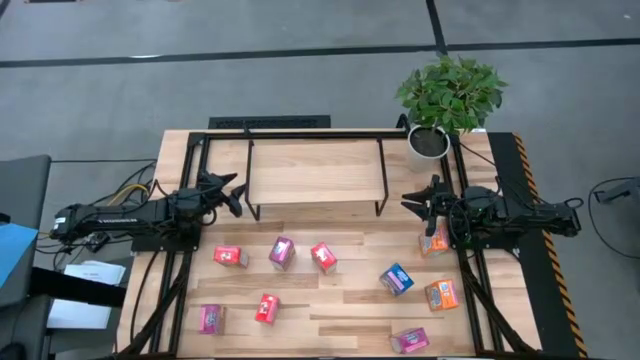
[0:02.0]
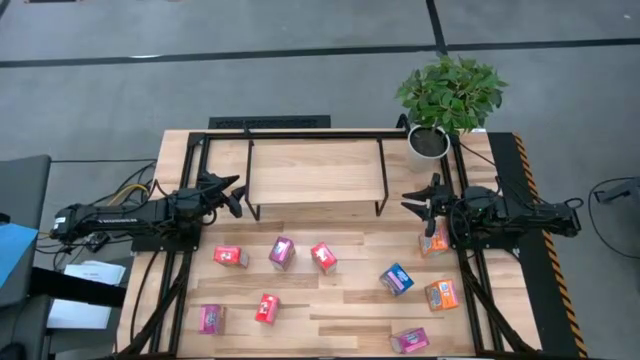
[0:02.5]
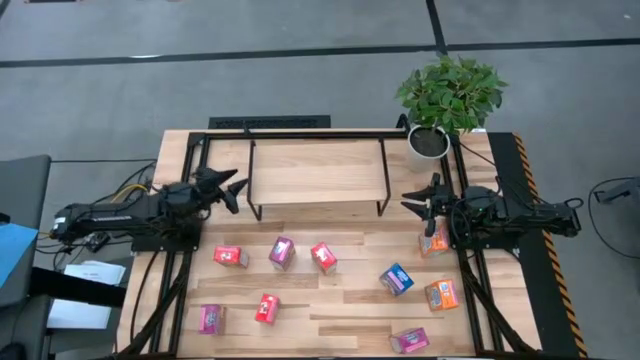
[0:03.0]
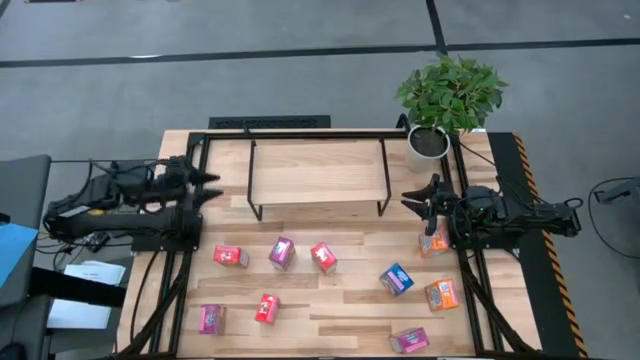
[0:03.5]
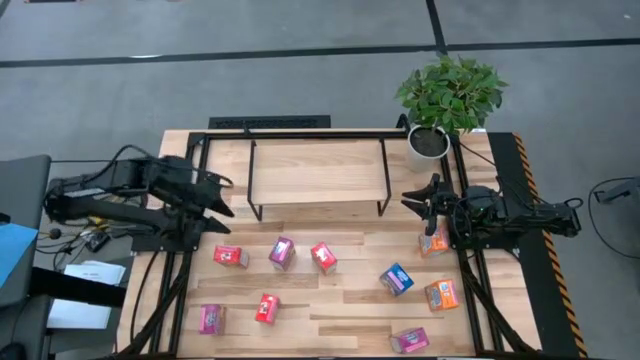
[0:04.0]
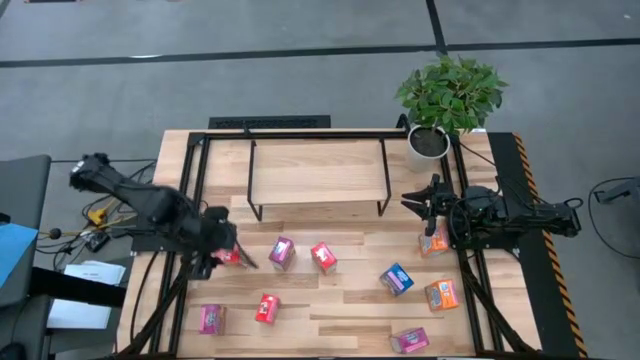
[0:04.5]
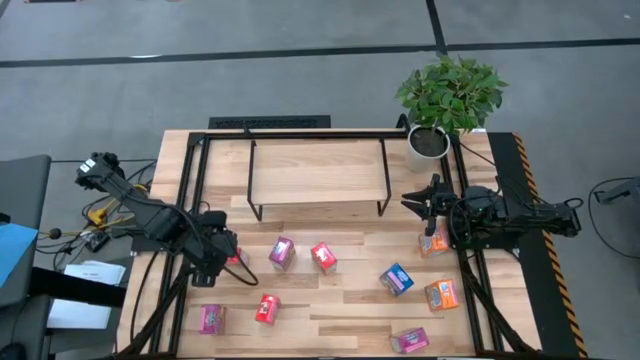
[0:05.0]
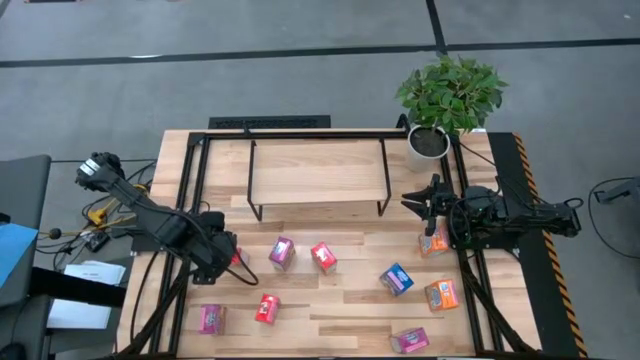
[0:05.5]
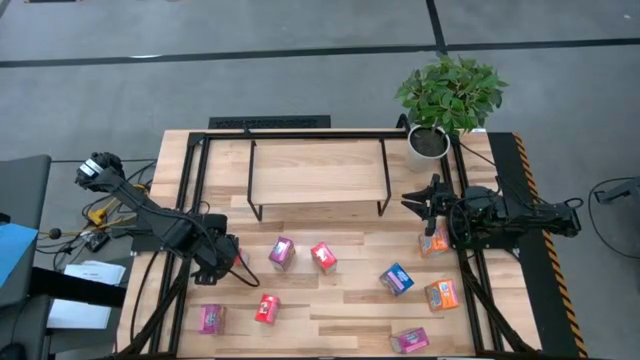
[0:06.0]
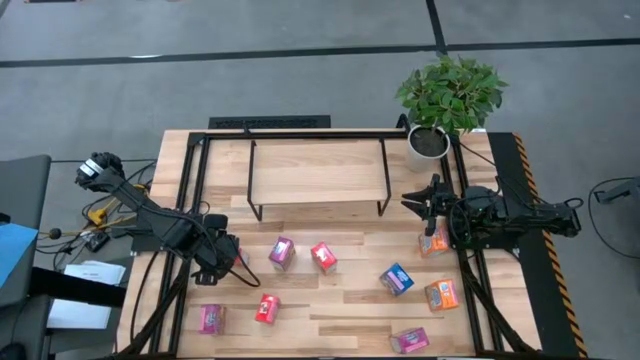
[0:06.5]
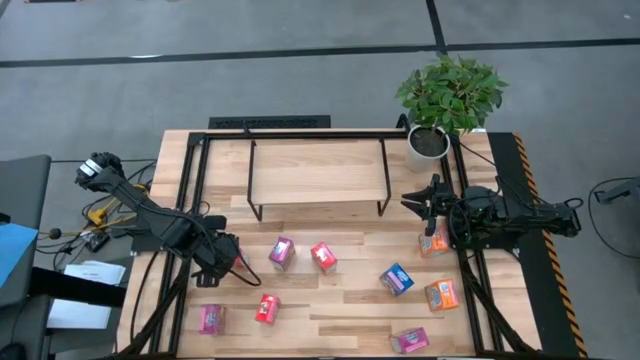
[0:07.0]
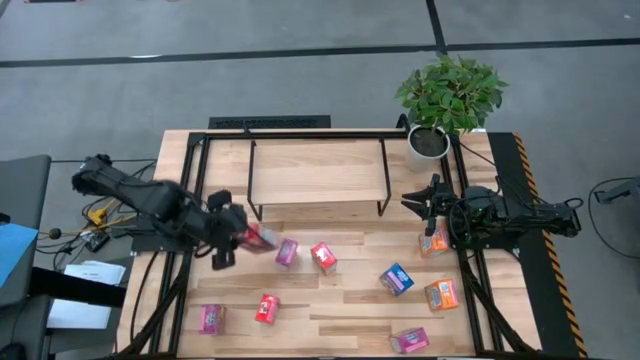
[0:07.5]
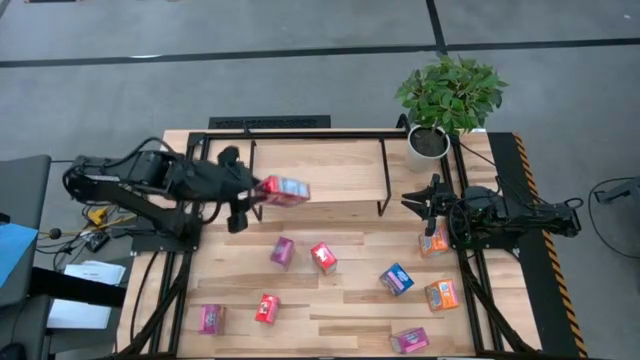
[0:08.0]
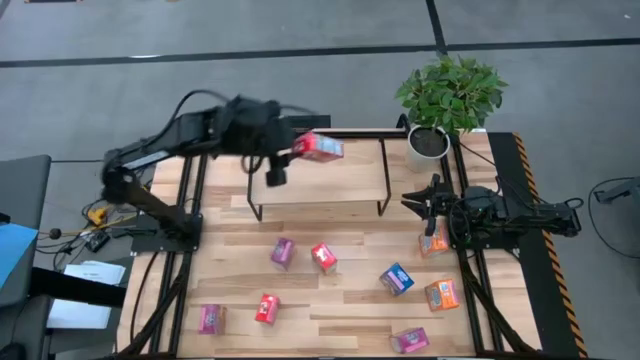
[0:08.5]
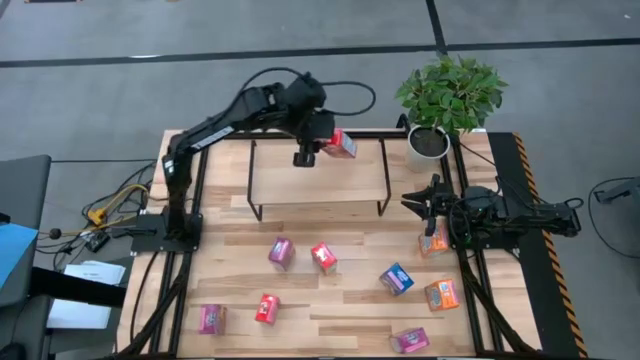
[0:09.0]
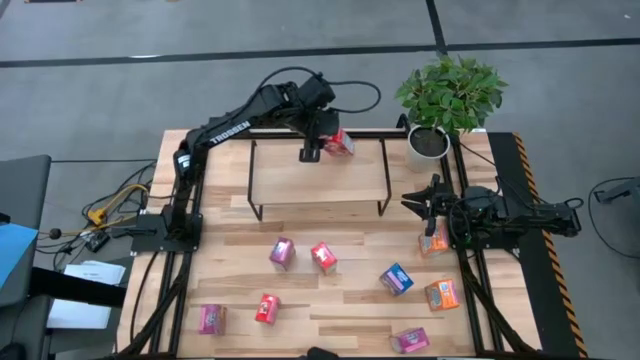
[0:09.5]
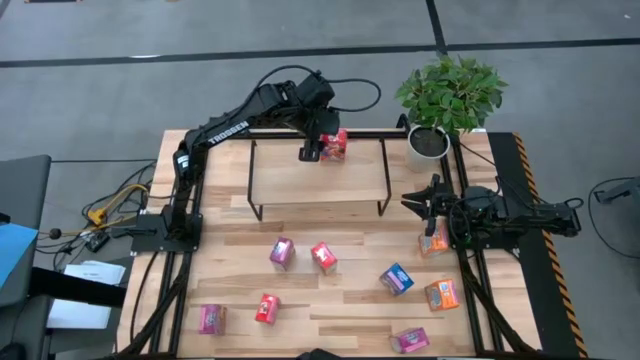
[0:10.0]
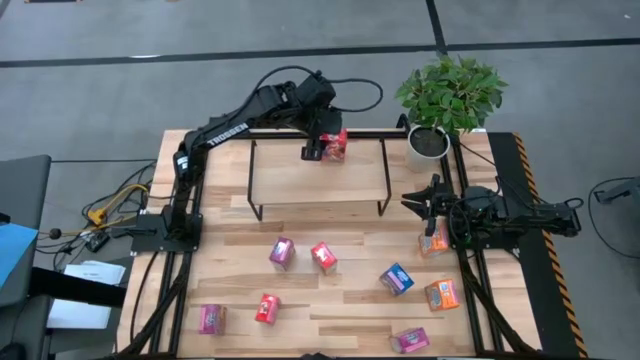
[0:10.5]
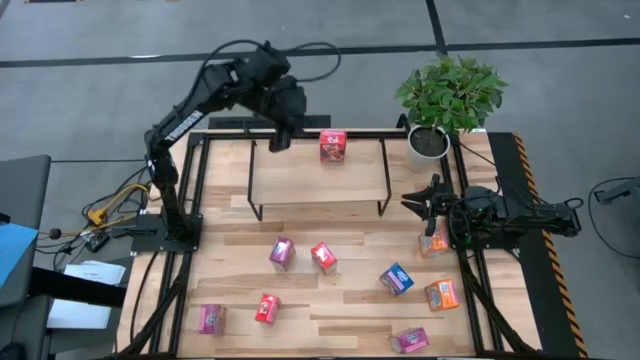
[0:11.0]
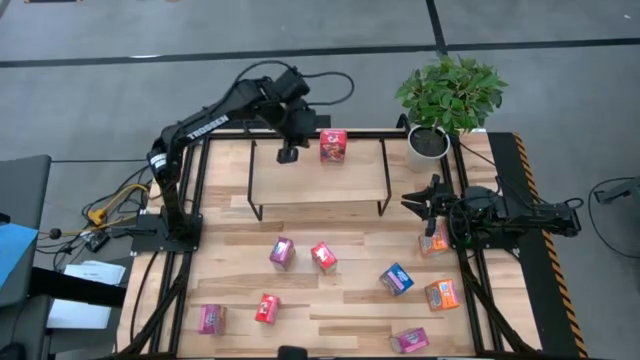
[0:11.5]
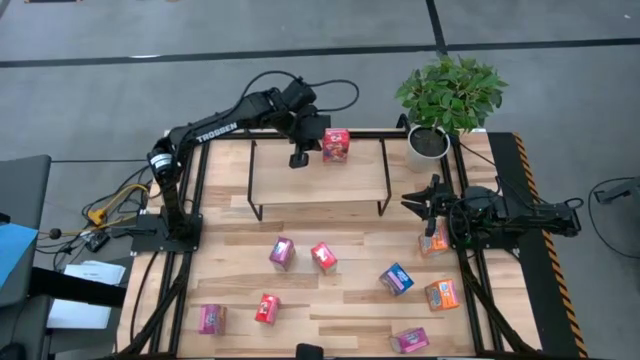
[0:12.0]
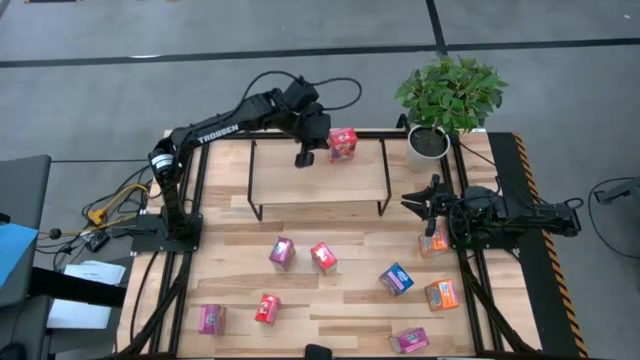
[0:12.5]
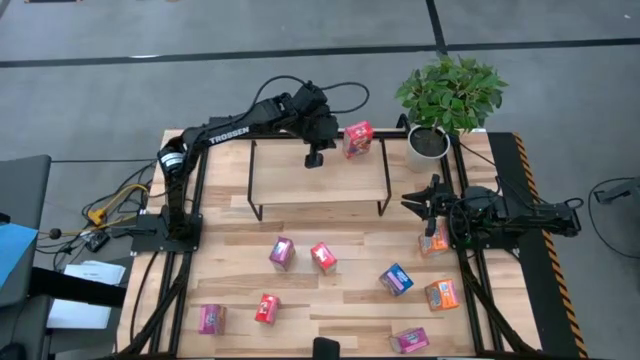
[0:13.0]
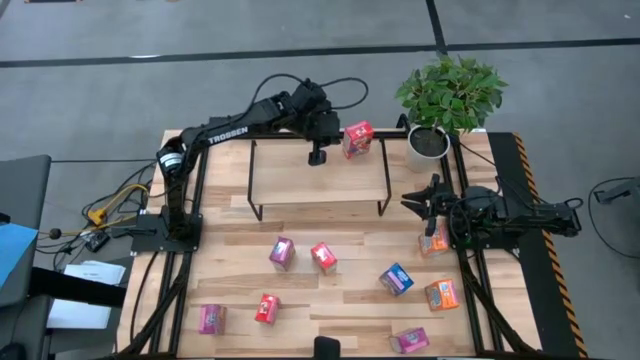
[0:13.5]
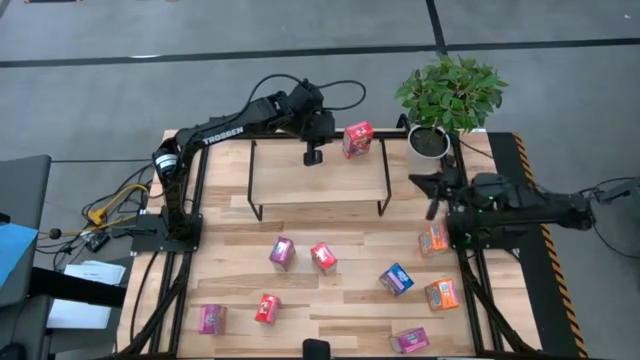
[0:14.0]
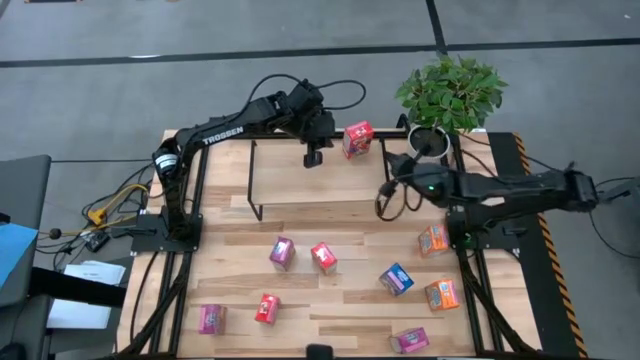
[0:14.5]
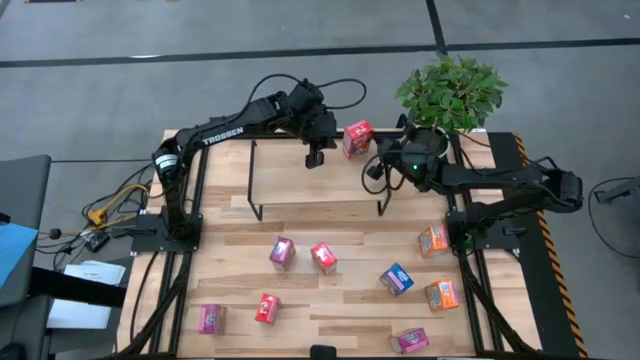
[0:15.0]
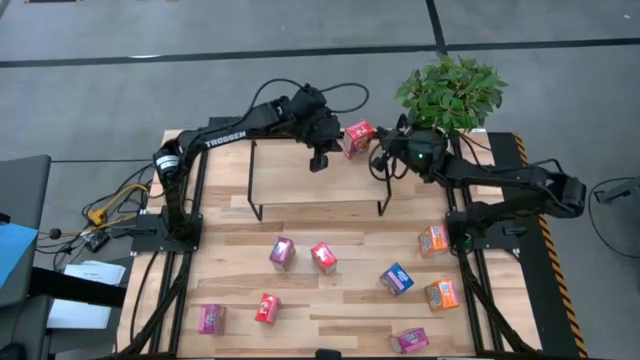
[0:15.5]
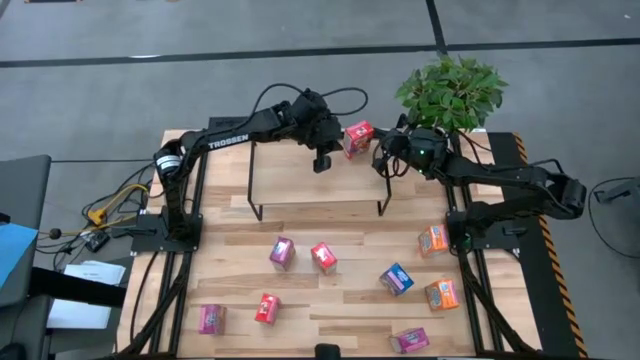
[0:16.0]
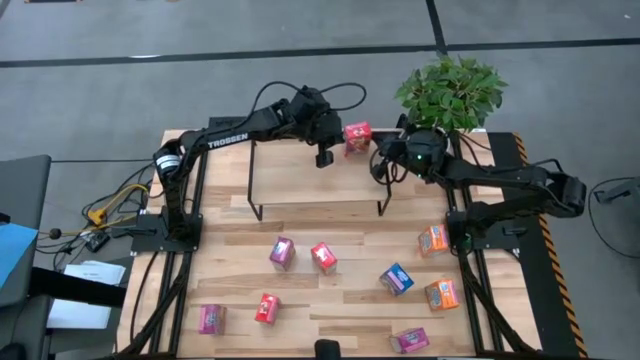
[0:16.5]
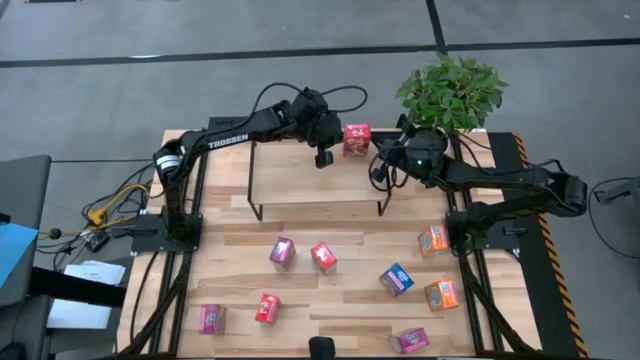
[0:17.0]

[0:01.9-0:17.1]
Task: Stack cereal on shelf
Put the top left red cereal box on the shelf

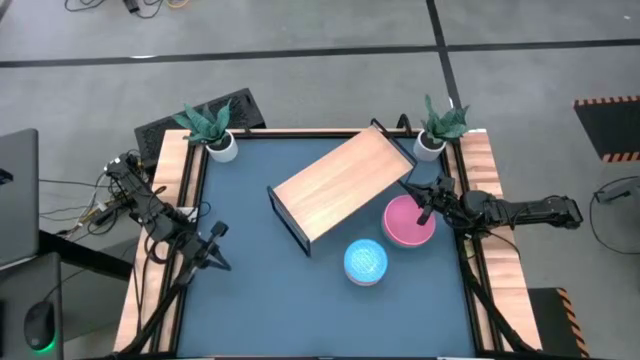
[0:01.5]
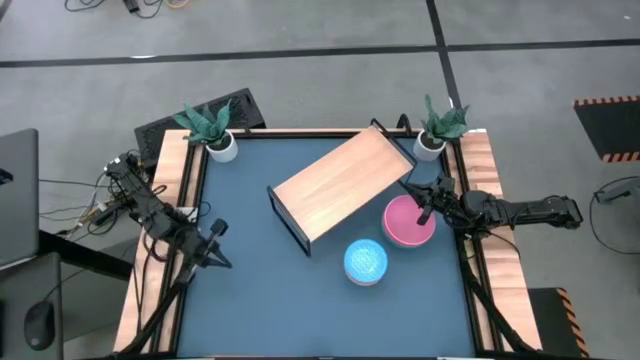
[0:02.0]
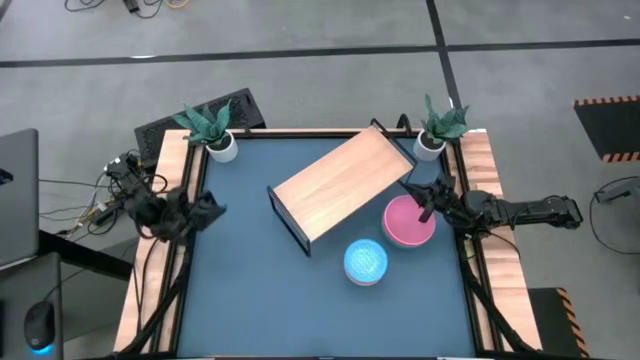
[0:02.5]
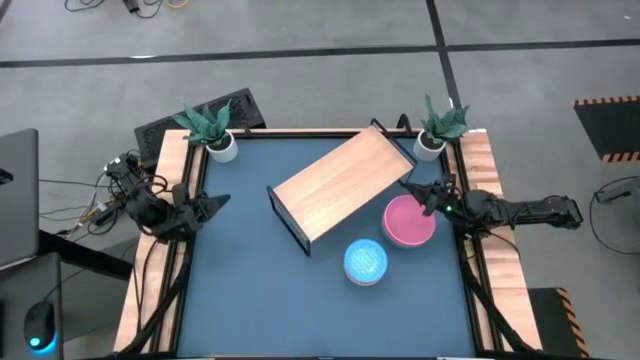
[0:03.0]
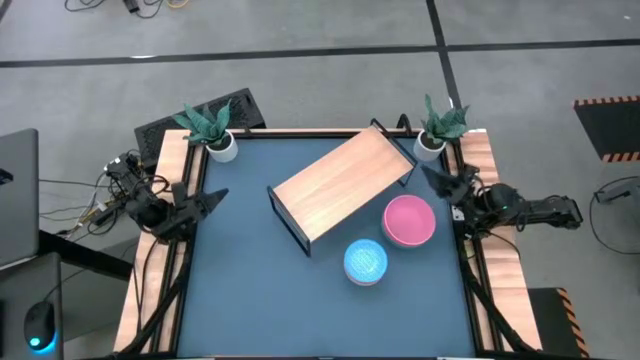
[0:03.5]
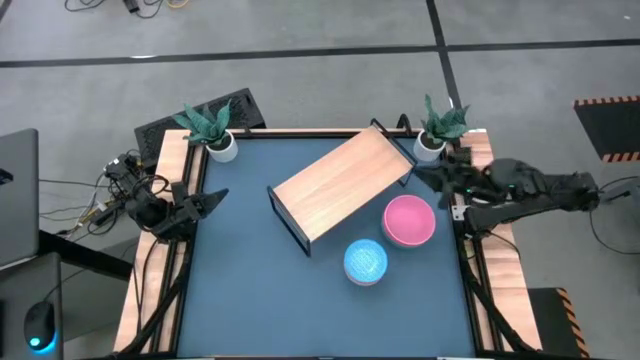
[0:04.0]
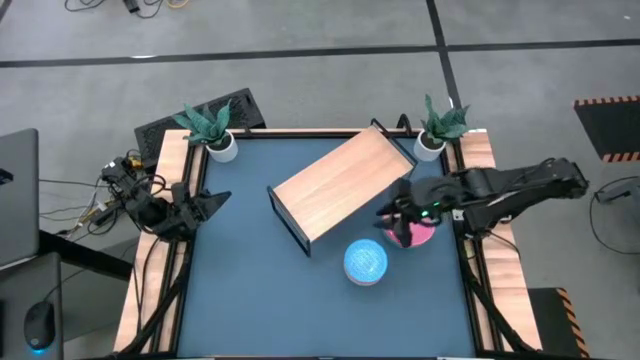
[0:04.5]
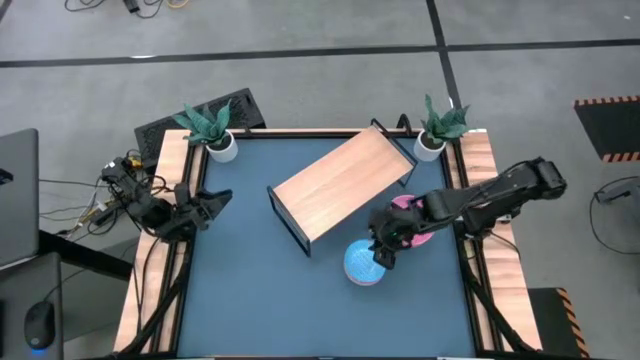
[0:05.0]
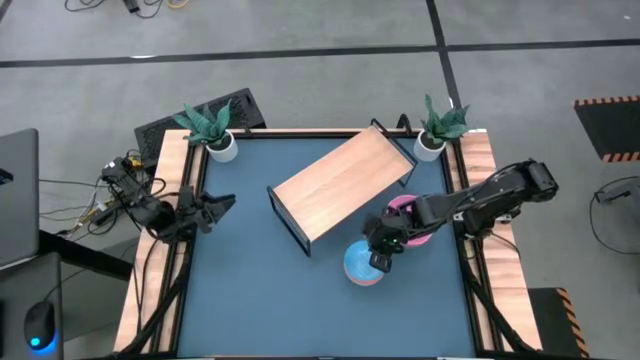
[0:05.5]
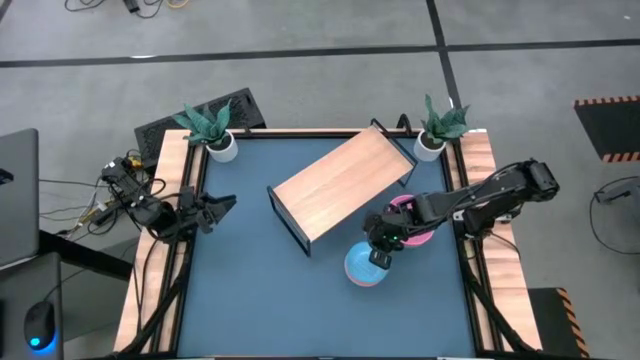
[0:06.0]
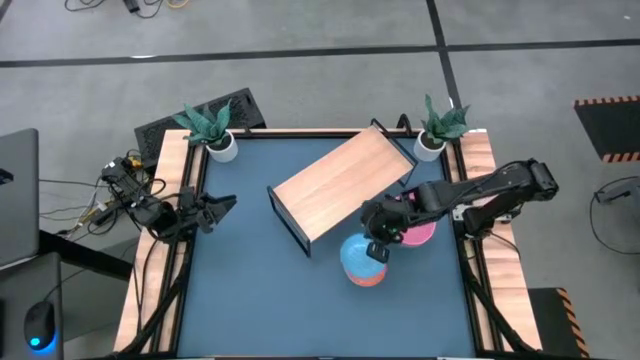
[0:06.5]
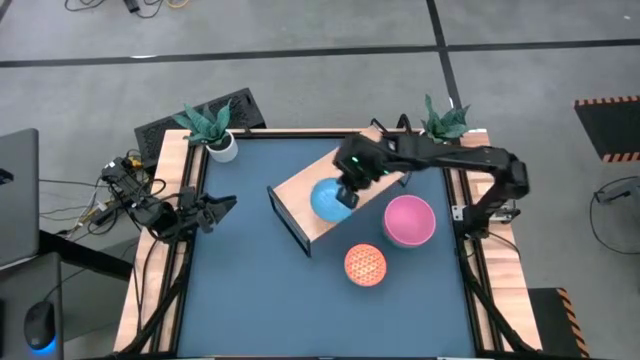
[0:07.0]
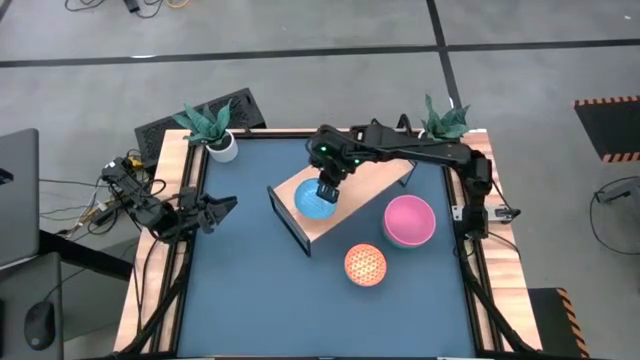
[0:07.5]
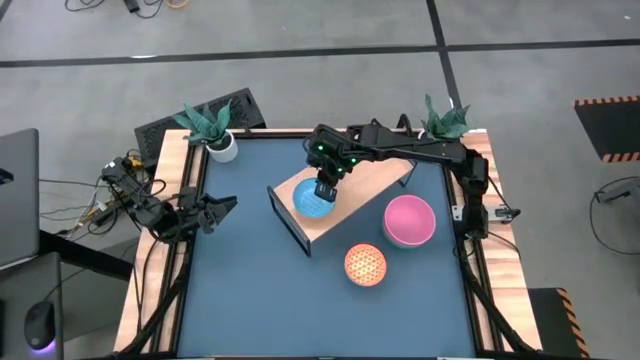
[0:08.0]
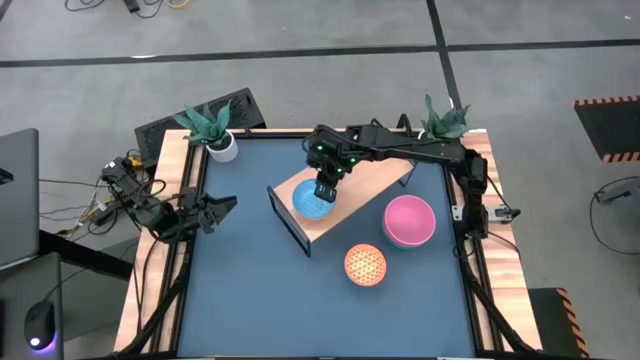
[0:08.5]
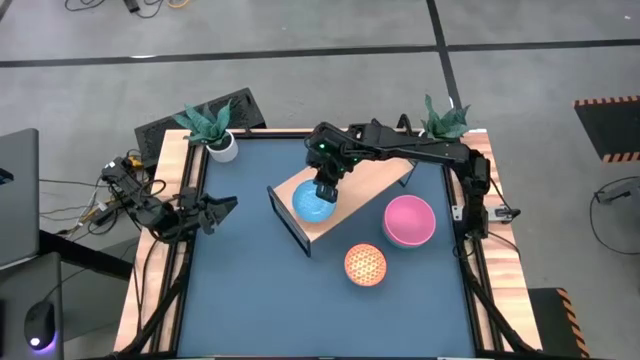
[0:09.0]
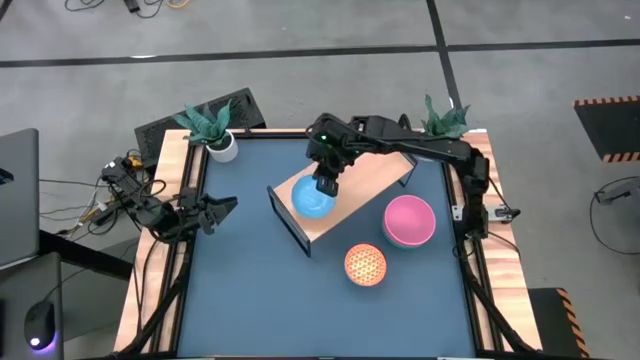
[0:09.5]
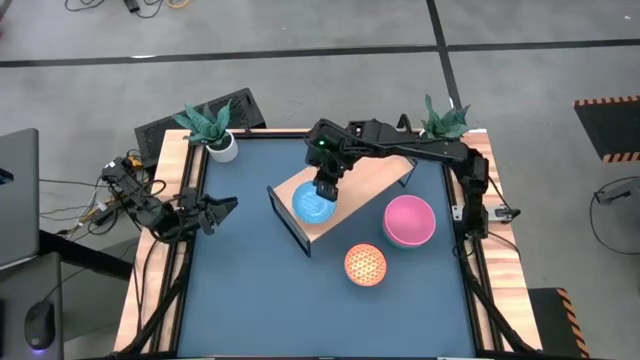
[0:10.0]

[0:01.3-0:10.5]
Task: Place and stack bowls onto a shelf
Put the blue patterned bowl on the shelf
